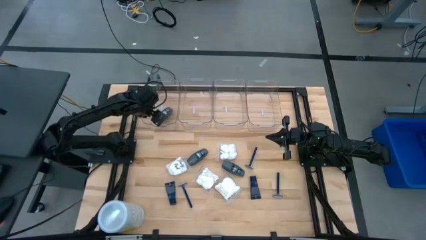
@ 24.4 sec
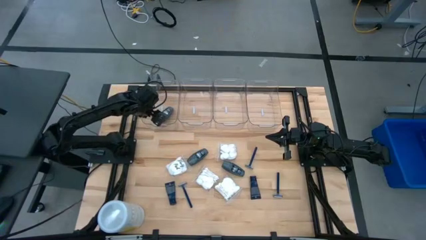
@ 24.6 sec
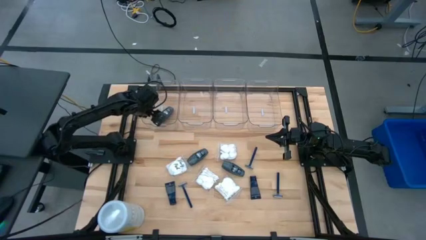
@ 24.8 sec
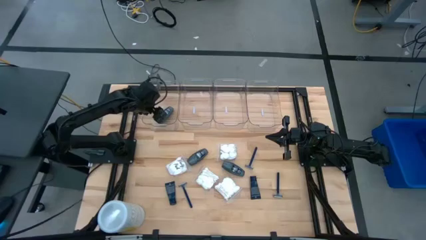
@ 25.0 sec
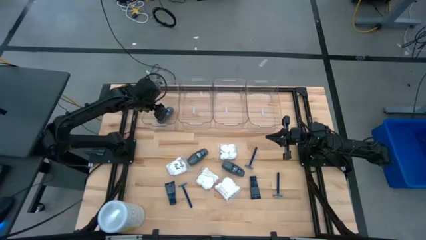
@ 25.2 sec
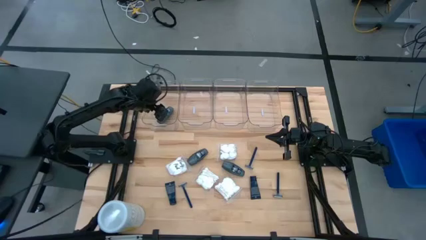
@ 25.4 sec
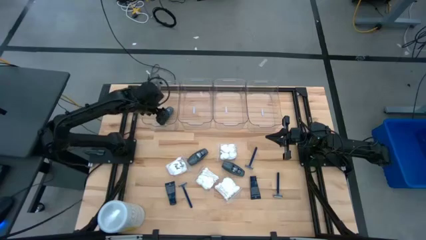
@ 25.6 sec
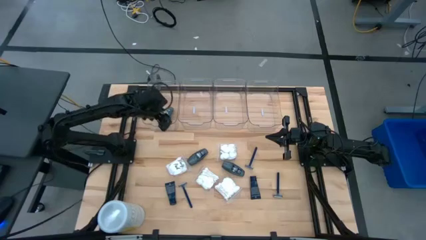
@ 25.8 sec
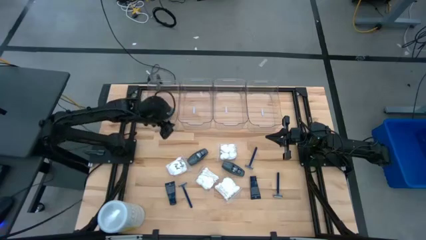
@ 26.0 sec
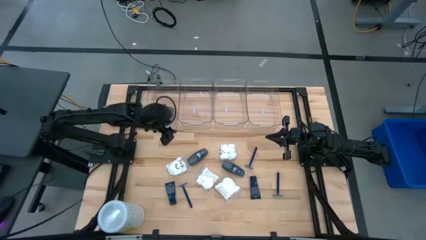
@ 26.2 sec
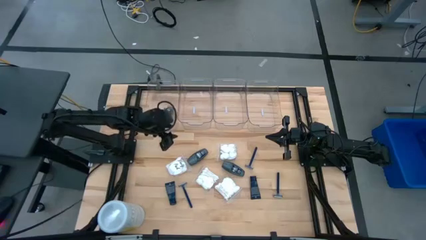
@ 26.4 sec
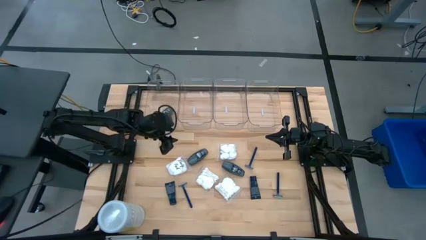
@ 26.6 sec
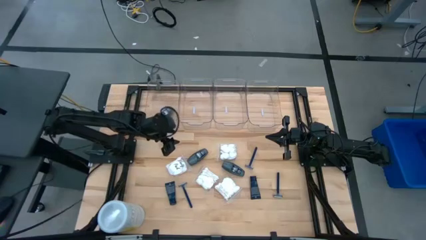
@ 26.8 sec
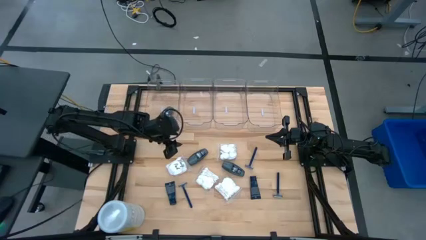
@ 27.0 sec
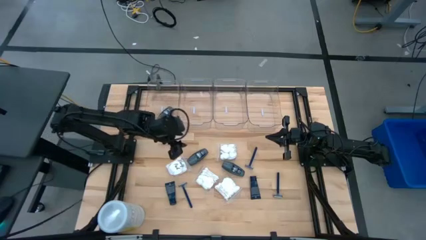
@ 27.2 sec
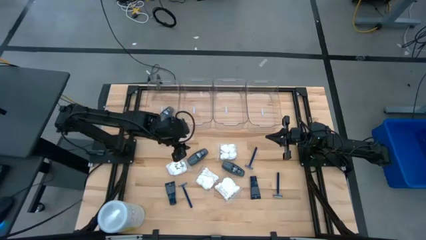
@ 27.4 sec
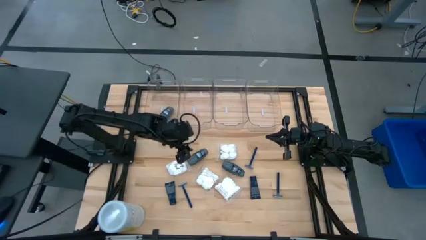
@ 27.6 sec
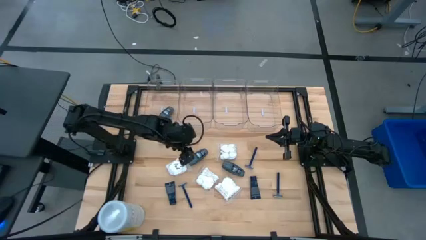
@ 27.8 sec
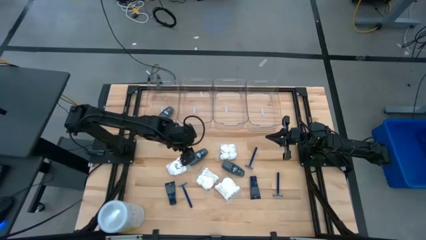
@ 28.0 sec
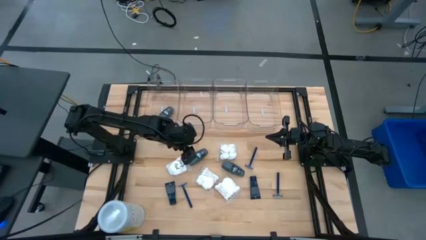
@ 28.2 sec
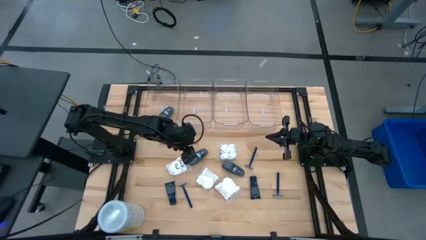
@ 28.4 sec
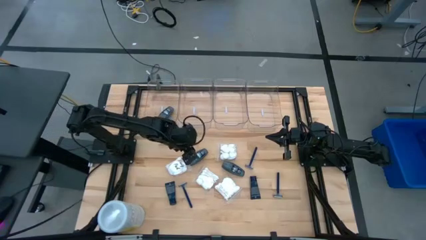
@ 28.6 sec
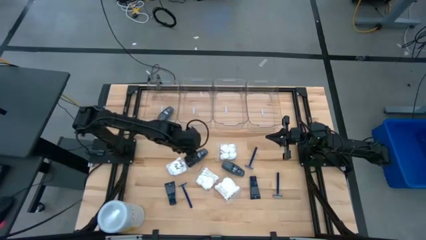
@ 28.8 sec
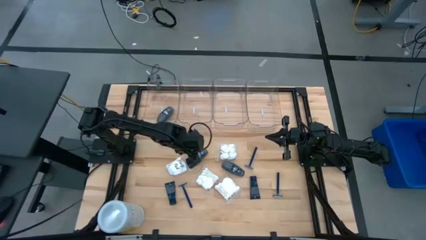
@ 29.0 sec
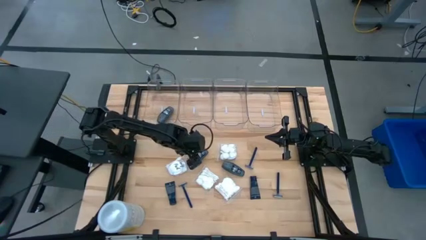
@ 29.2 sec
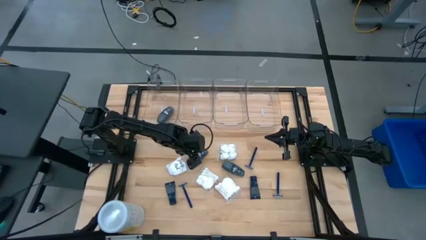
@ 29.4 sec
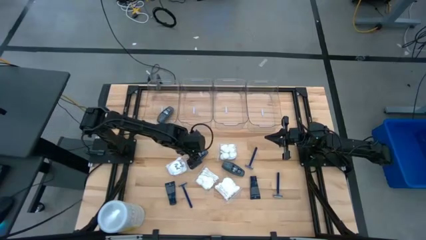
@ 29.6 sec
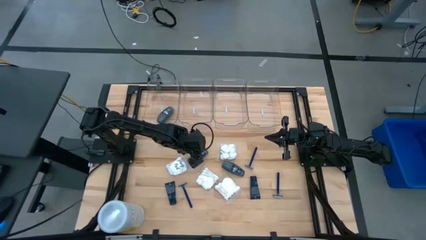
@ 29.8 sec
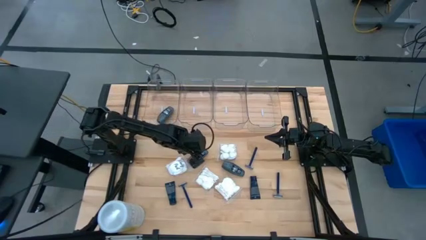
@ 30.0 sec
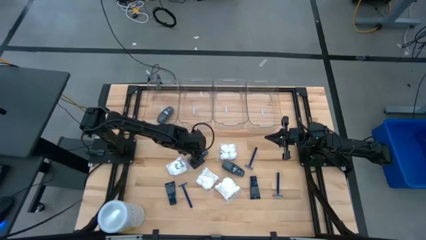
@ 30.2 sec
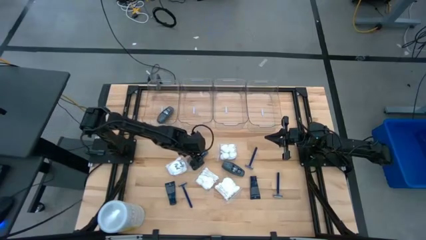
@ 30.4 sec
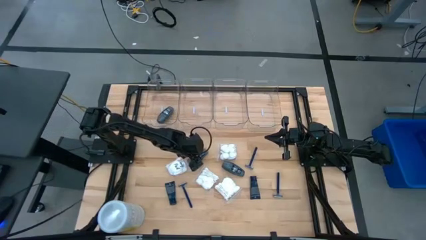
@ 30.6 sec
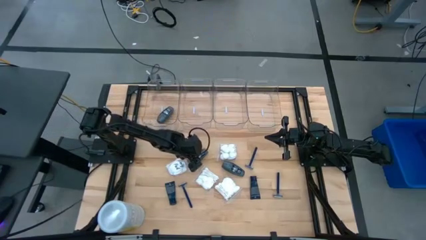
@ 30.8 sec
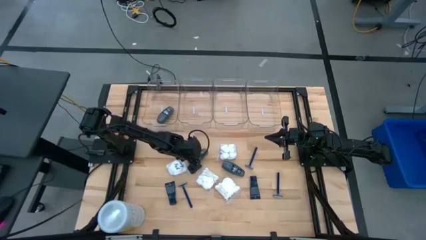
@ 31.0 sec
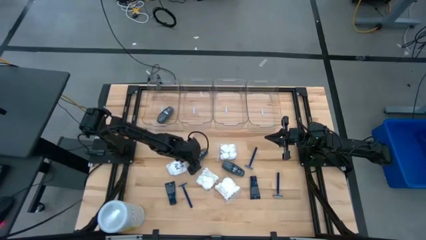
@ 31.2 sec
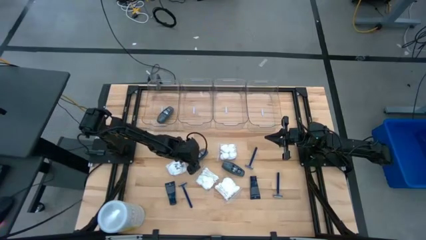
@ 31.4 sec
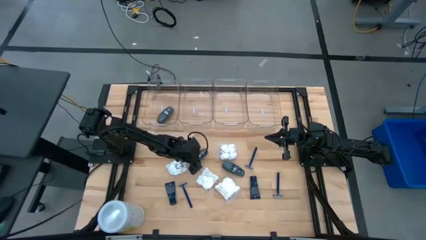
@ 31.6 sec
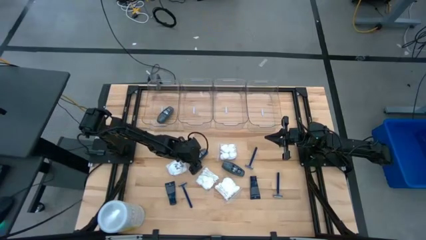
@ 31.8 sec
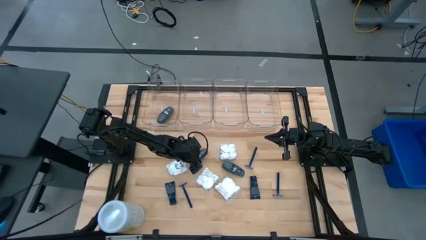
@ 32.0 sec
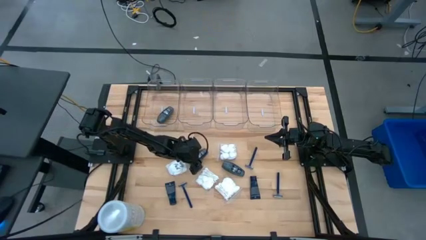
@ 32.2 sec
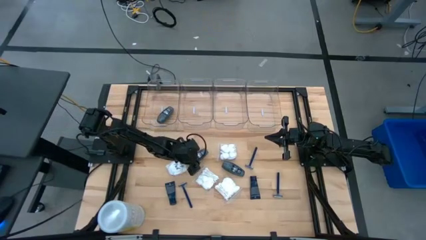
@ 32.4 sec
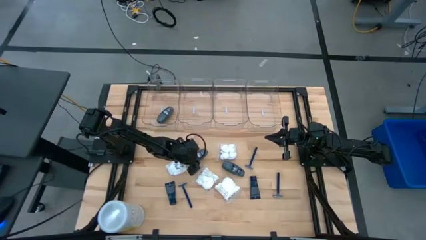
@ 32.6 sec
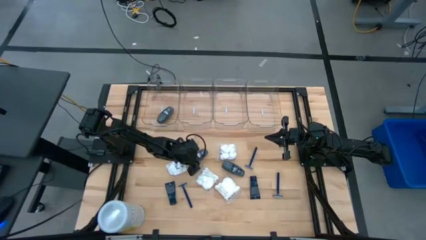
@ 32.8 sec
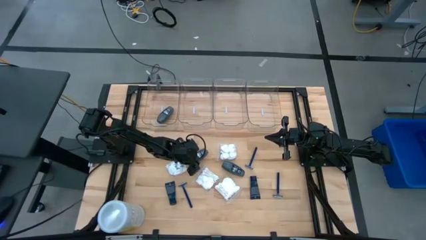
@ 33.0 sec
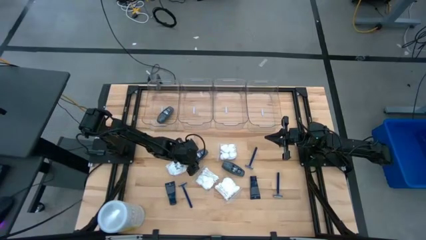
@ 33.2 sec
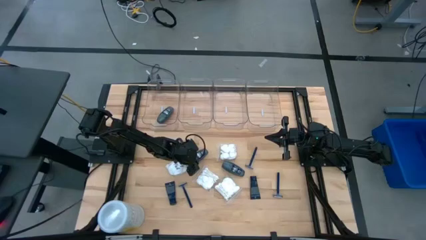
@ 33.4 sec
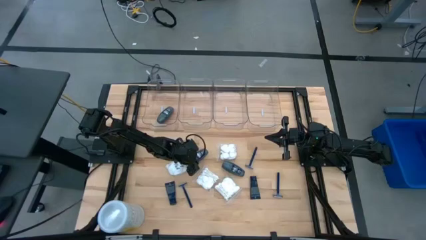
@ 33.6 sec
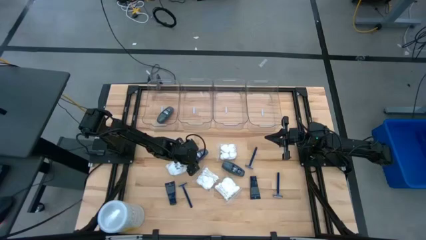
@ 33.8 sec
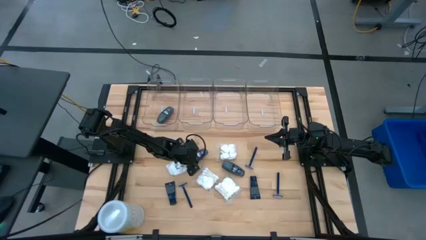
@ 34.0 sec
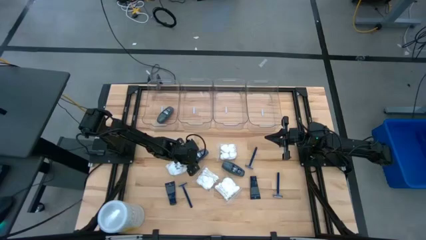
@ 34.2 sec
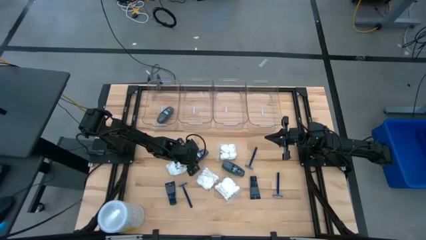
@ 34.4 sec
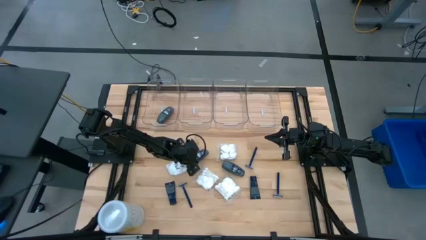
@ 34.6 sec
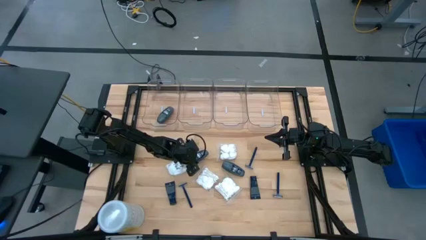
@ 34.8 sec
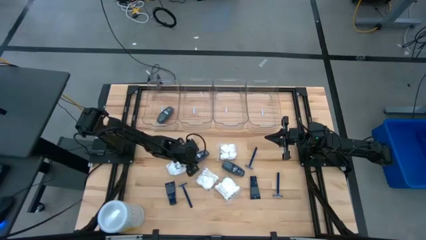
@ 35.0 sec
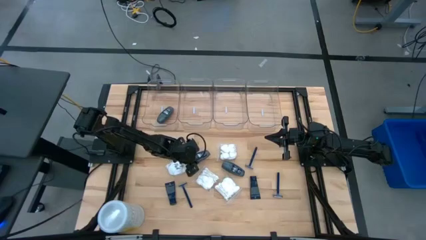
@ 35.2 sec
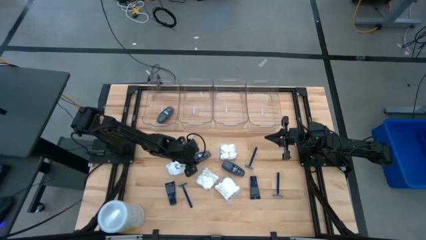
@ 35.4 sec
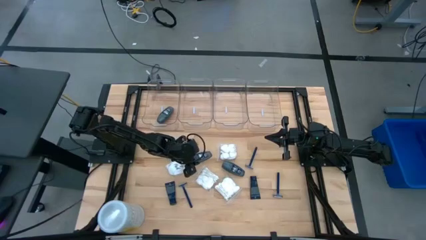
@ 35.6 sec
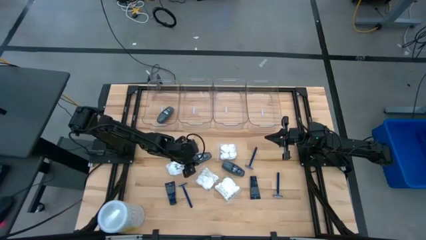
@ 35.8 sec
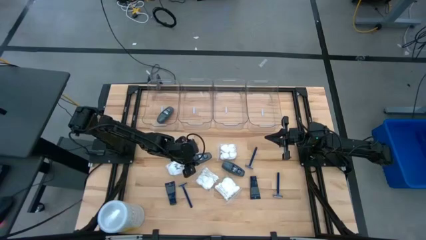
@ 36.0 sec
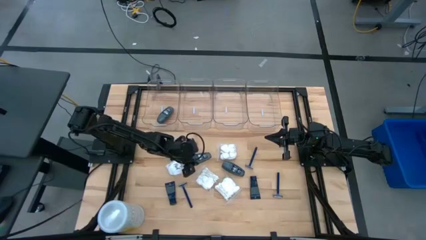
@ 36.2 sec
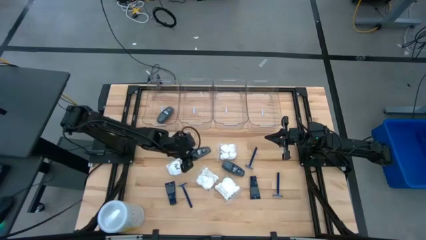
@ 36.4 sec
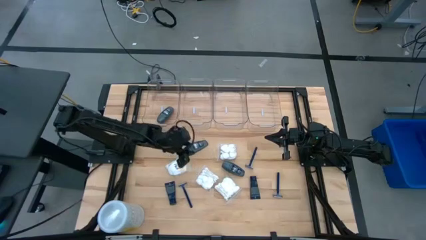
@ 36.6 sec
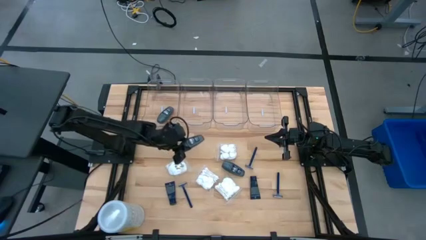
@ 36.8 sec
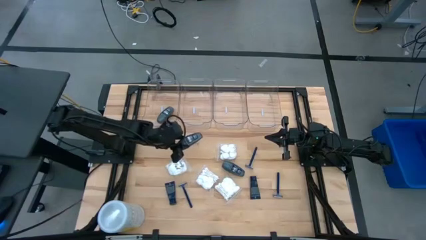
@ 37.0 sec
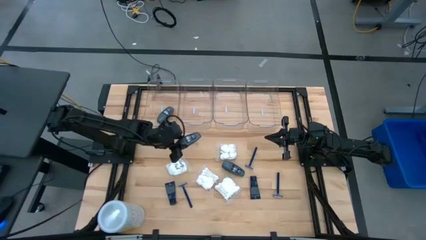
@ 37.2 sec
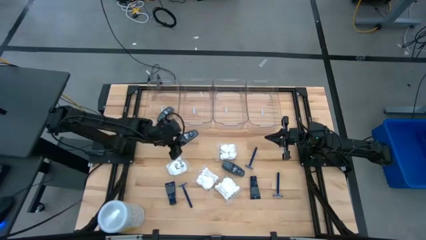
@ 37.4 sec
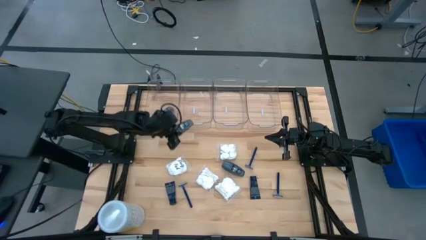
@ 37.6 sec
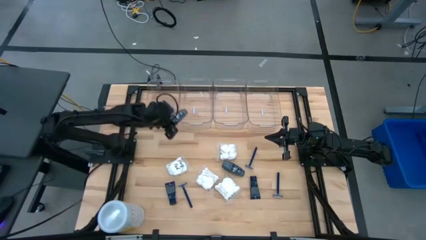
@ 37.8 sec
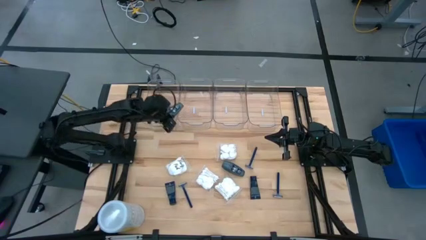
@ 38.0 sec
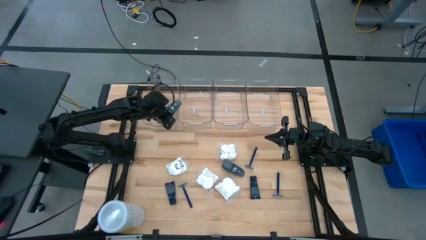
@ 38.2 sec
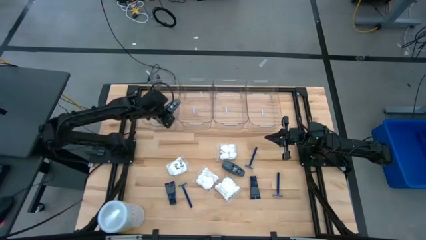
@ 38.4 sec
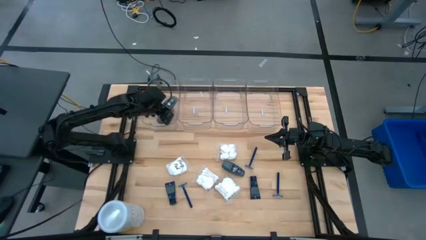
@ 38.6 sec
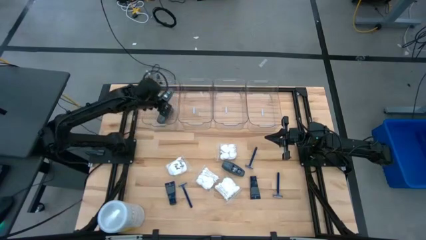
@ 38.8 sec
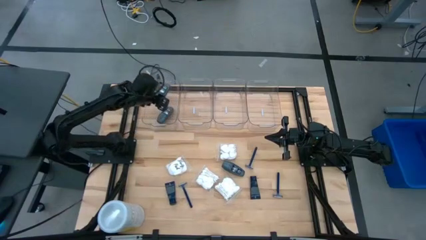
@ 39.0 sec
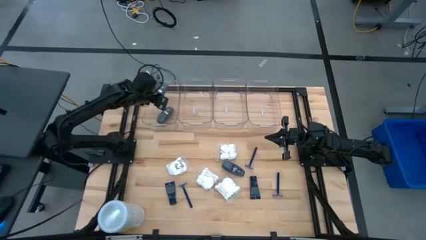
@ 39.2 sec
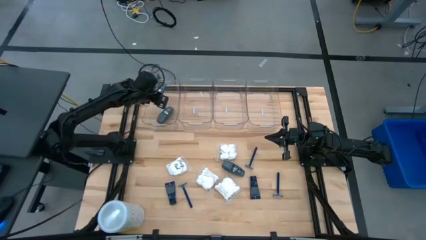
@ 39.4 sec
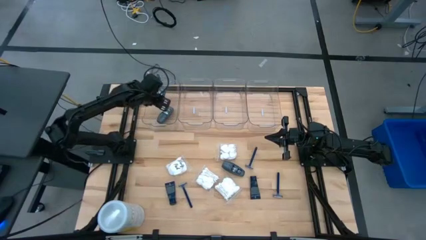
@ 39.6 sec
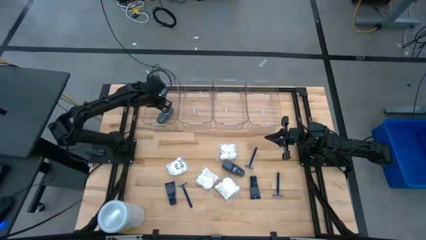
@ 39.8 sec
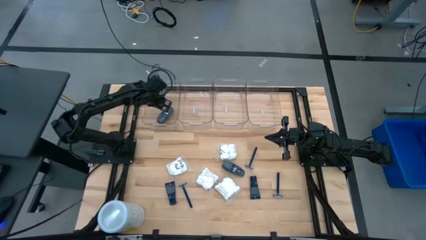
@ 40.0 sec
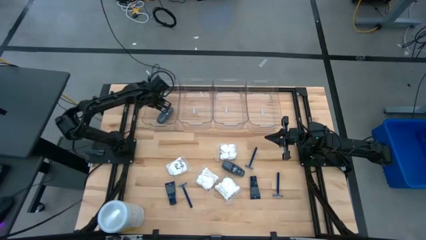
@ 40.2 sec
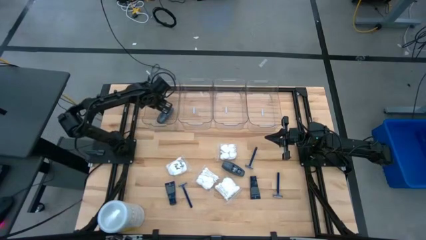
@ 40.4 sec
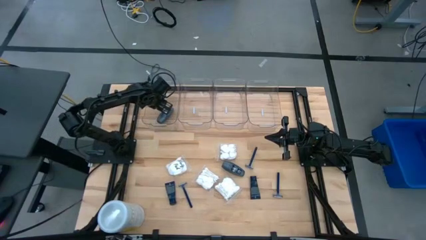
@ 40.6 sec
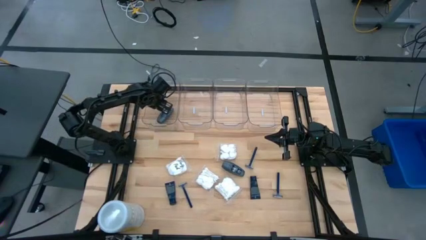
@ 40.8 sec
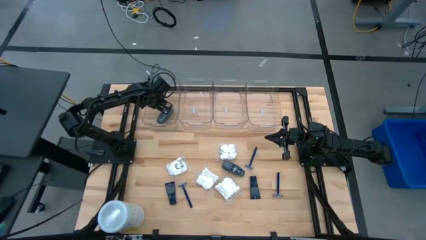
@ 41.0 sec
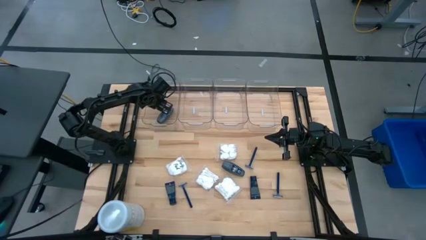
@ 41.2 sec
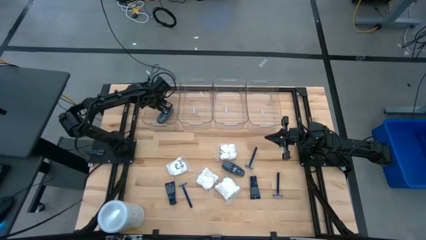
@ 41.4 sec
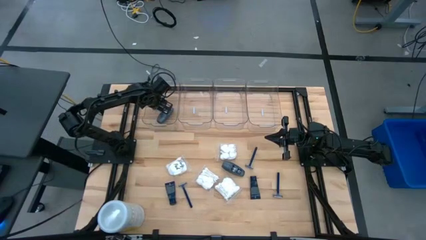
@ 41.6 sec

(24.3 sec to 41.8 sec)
Task: Pick & Place Travel size toiletries
Put the left gray deodorant into the left transparent bin
